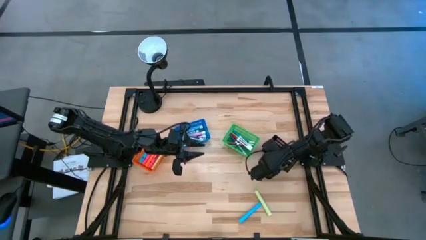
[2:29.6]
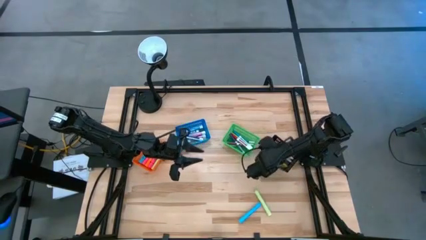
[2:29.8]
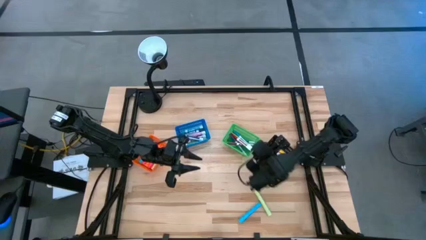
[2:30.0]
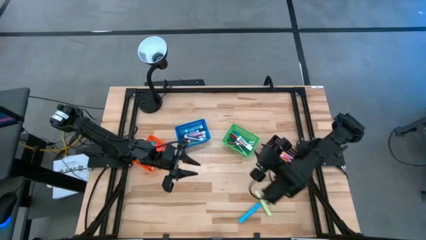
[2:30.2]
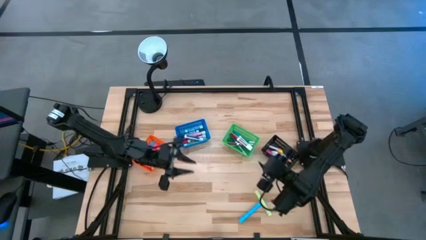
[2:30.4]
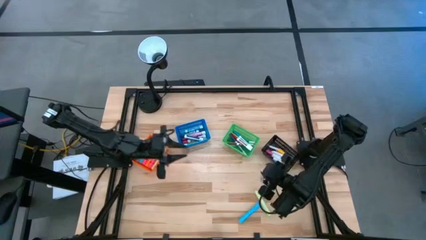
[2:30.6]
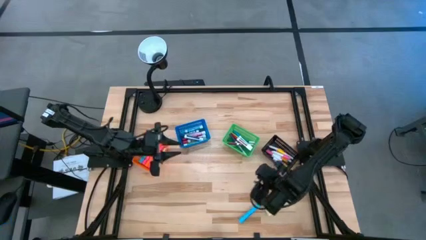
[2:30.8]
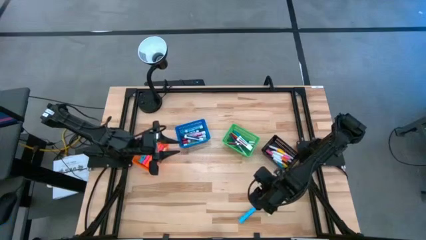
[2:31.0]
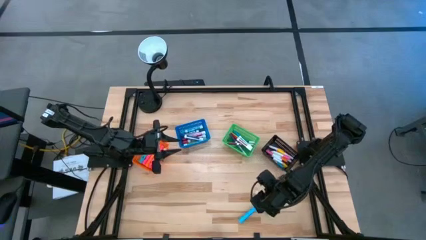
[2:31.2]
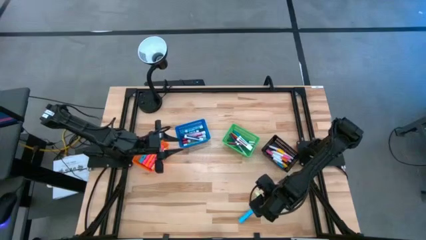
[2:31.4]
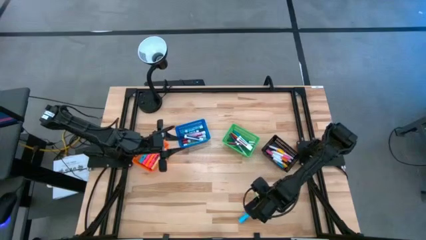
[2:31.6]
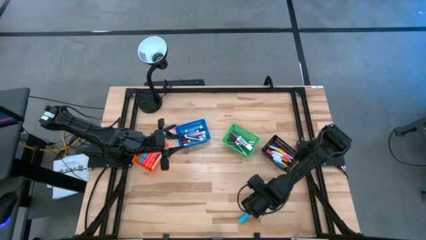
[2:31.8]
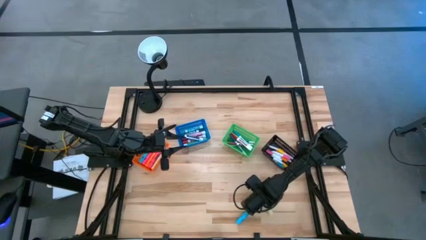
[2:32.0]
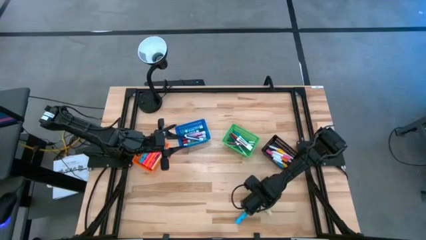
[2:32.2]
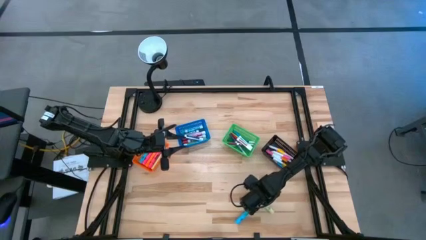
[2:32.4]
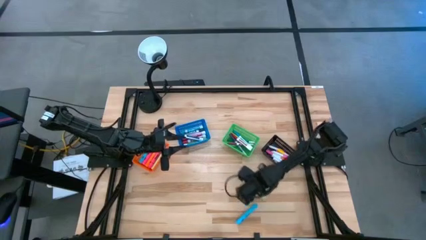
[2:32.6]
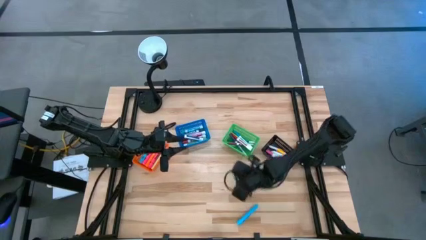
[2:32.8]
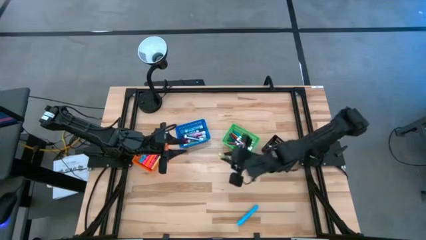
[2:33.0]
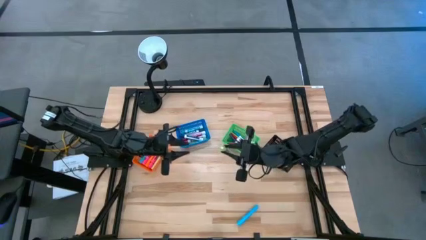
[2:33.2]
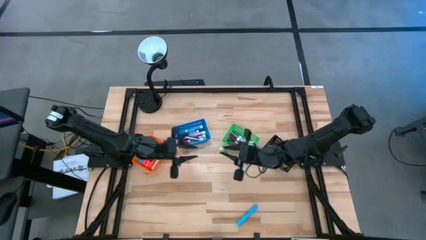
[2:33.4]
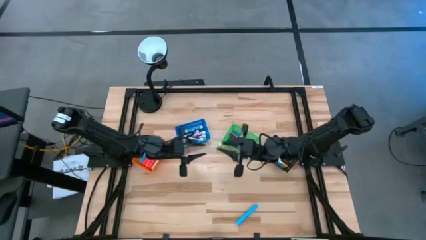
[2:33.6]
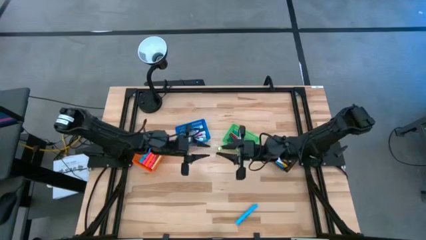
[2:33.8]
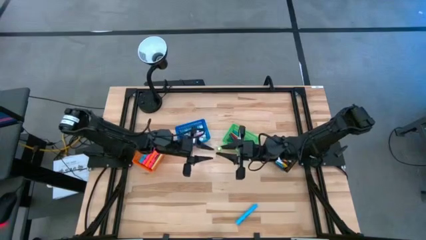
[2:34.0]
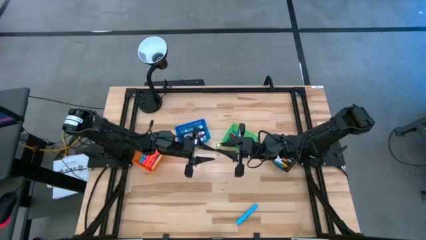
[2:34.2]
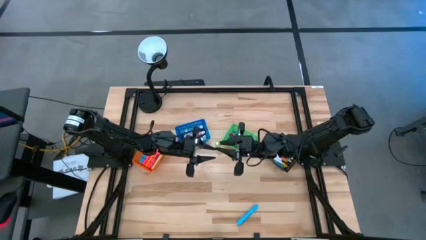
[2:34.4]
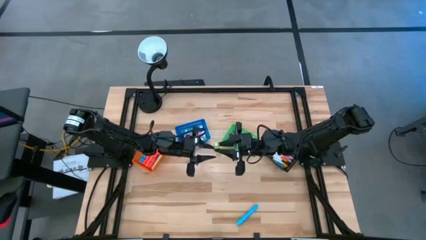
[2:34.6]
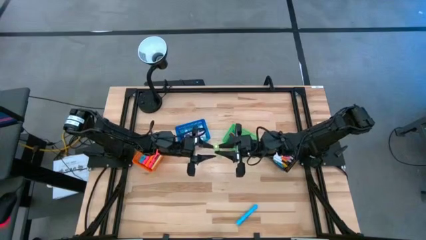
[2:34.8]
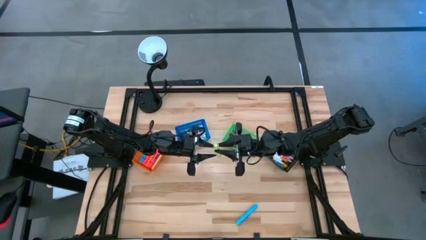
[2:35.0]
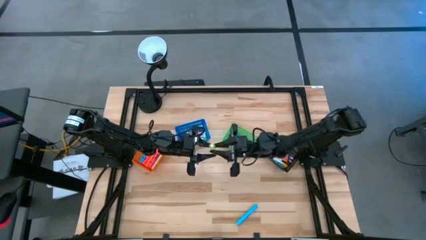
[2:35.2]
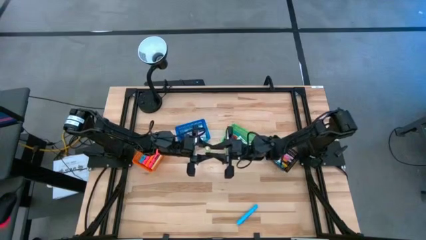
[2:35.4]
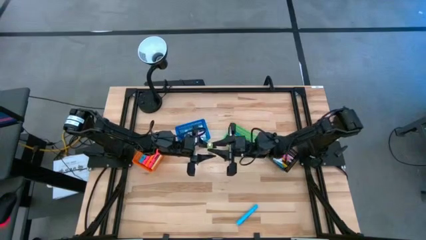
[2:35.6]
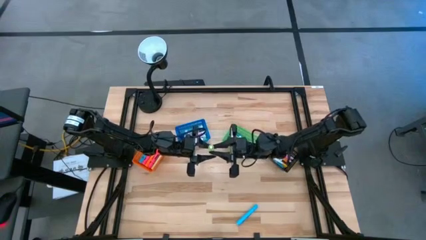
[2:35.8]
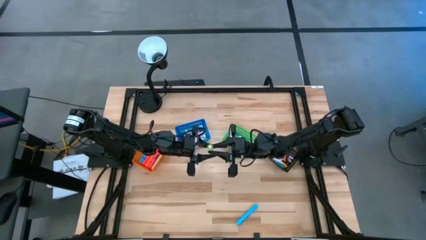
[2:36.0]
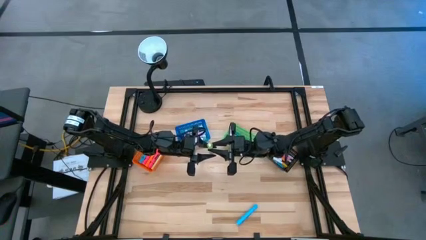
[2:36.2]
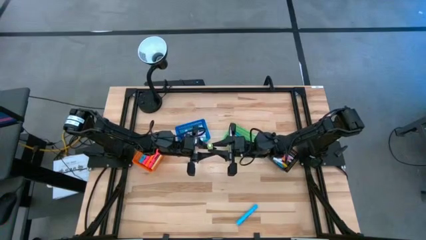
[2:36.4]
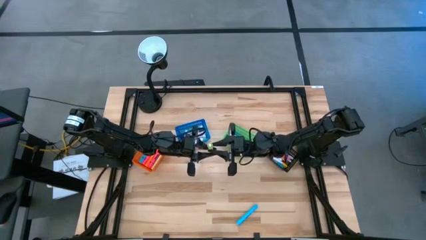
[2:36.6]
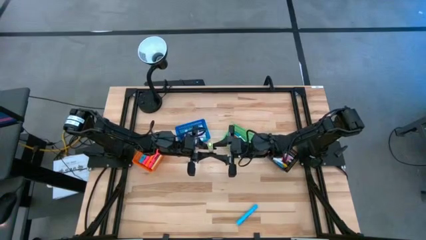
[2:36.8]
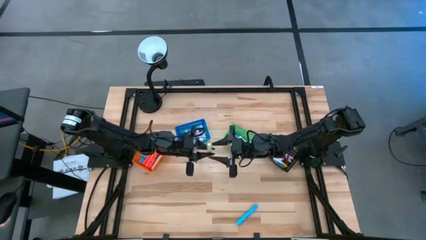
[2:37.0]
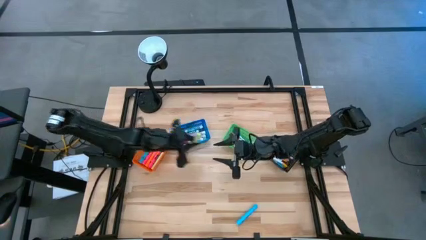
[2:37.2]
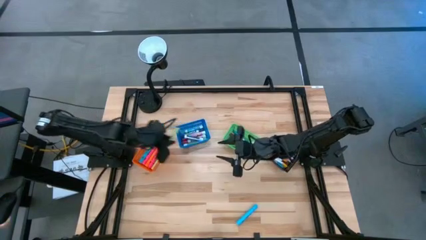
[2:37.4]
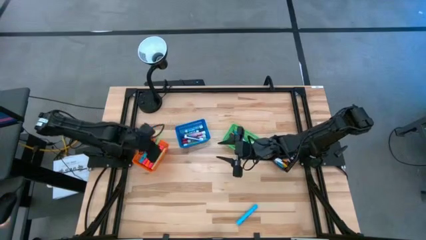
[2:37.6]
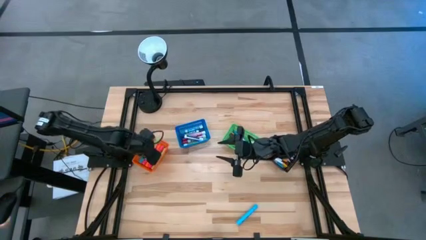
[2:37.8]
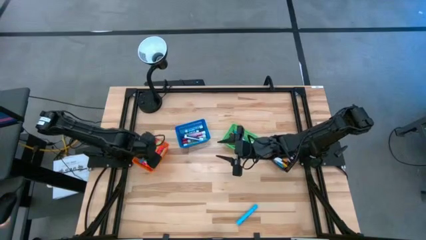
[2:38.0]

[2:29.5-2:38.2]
Task: Pick & Place Markers
Put the light green highlighter pen into the orange basket

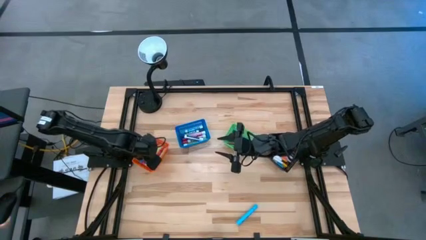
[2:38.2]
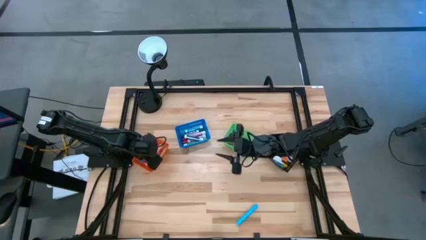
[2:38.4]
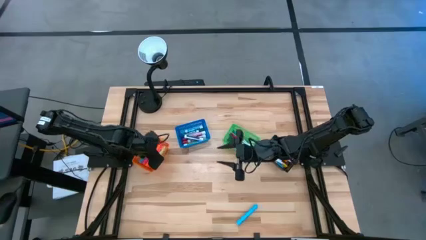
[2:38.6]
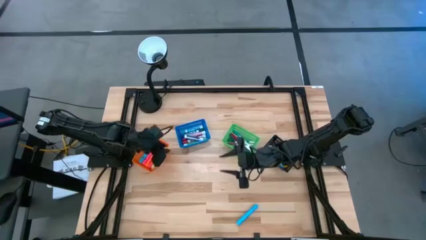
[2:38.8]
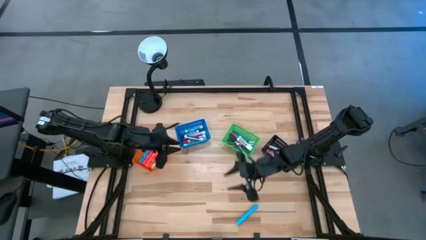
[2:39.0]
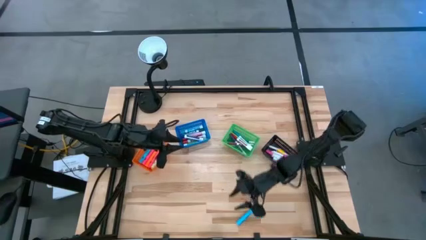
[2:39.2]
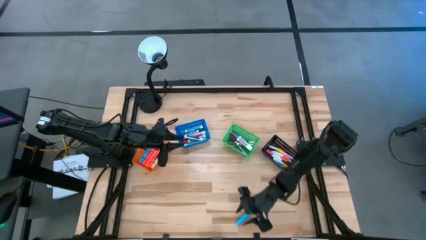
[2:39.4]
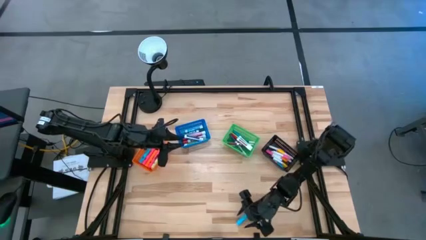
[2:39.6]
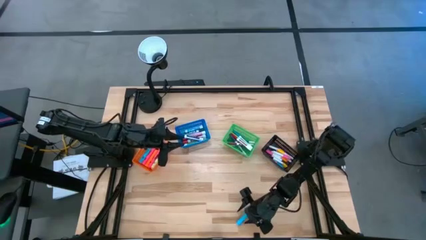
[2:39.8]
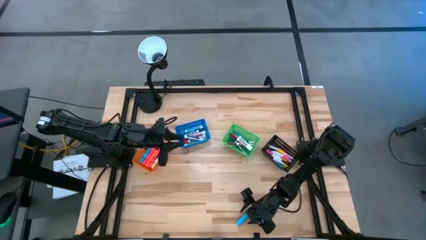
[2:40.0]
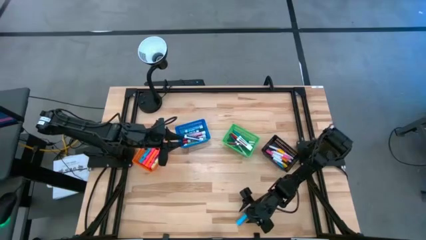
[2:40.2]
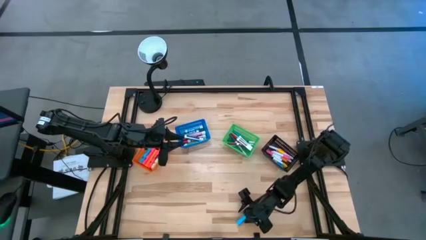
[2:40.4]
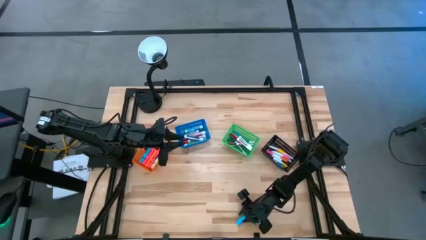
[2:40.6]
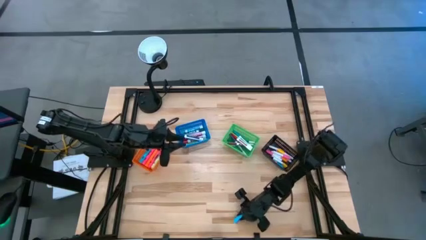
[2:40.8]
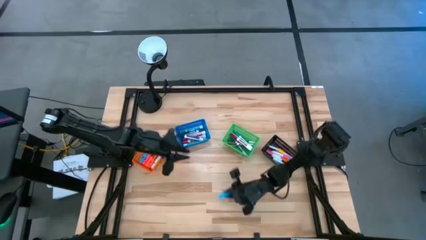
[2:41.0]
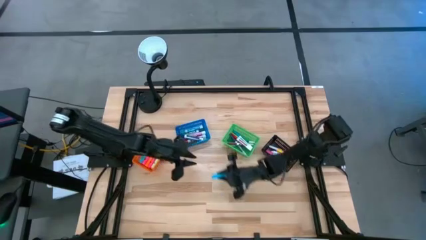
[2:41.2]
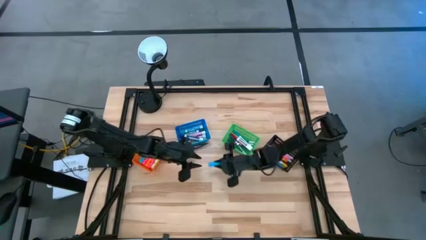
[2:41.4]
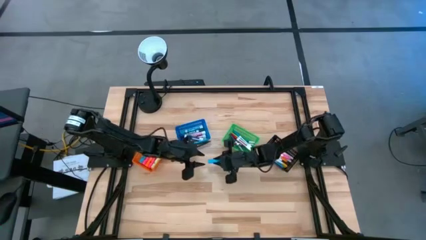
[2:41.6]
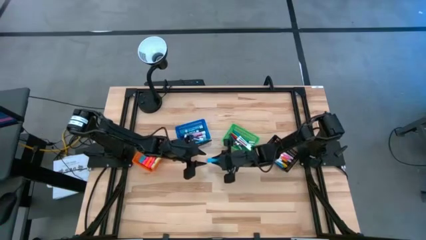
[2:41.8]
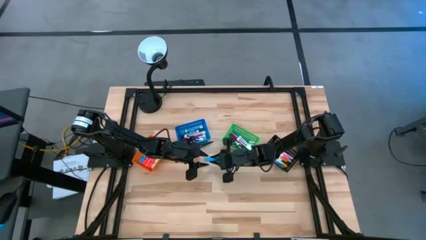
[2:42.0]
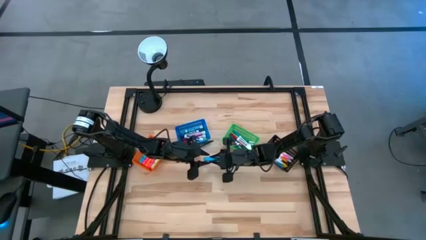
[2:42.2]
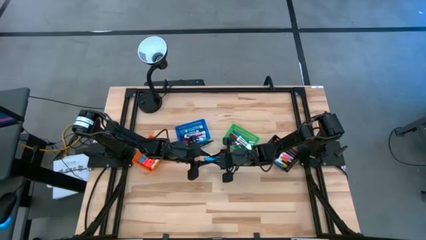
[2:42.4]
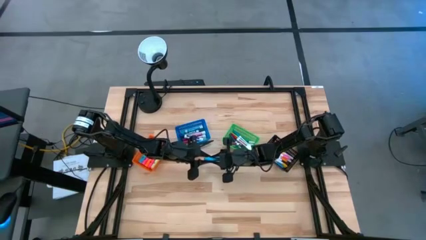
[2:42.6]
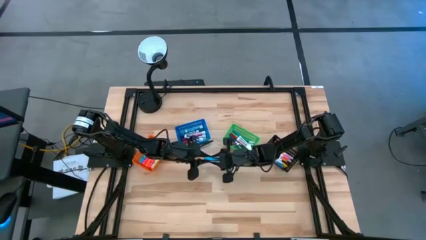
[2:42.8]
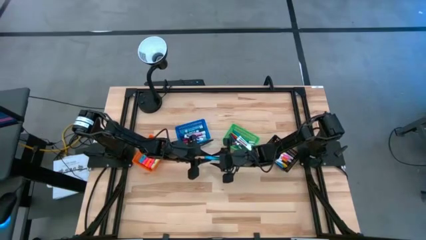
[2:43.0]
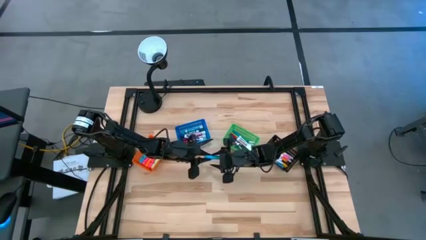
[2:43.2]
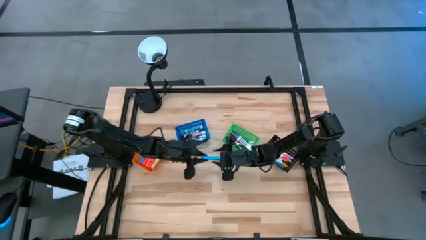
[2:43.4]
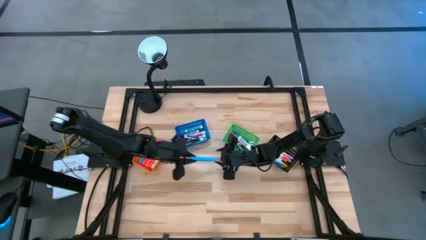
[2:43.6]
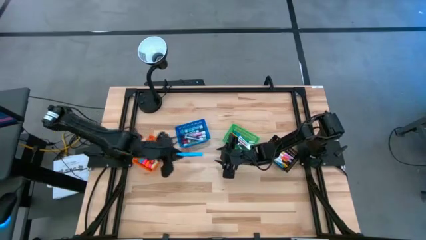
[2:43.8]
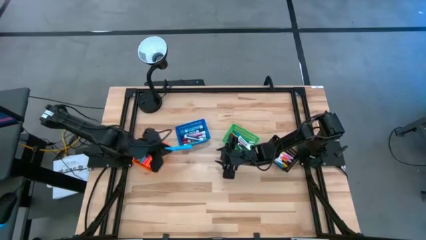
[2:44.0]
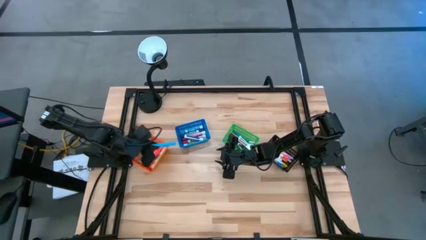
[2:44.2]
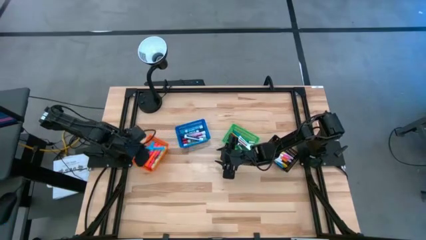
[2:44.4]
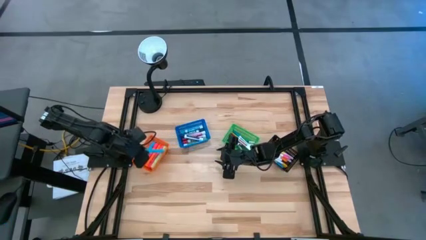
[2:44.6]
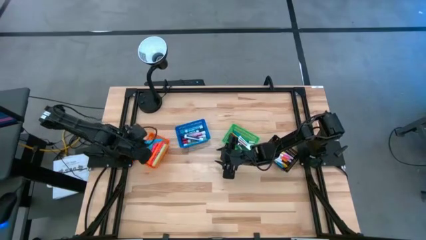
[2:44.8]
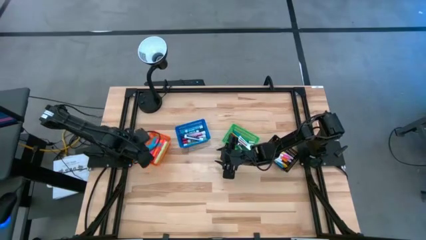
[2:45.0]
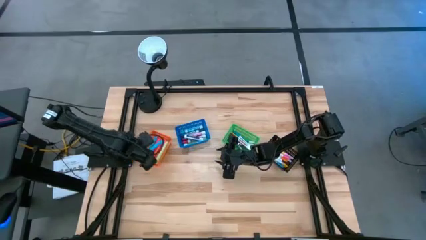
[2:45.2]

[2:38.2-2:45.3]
Put the light blue highlighter pen into the orange basket
